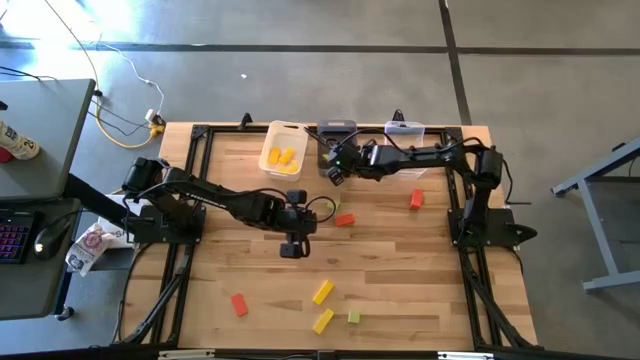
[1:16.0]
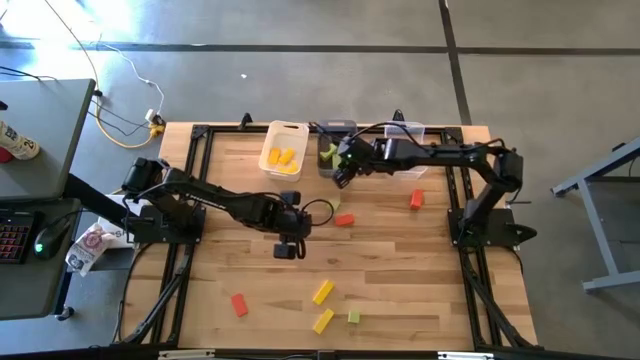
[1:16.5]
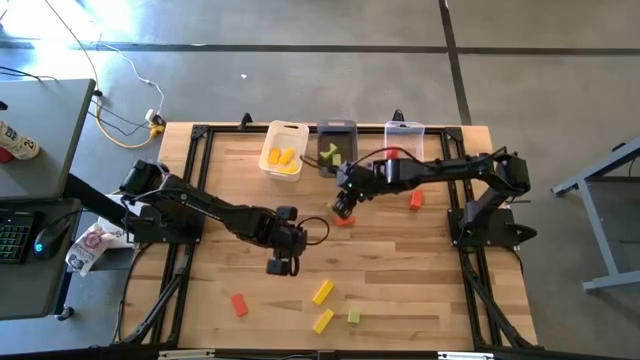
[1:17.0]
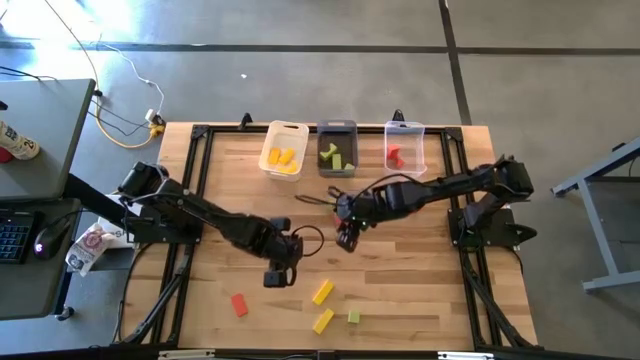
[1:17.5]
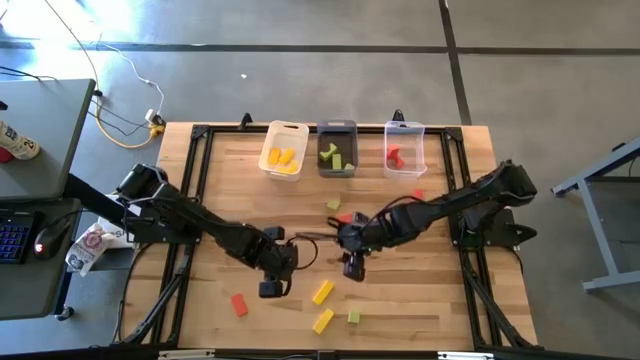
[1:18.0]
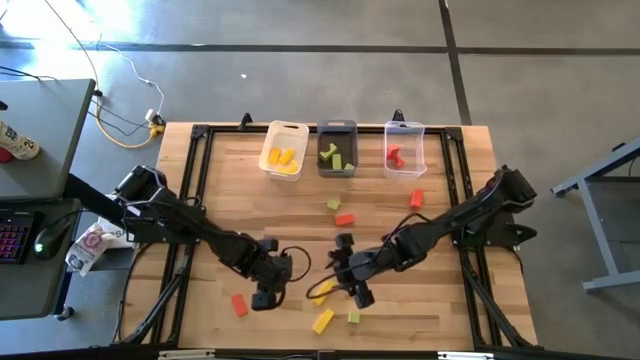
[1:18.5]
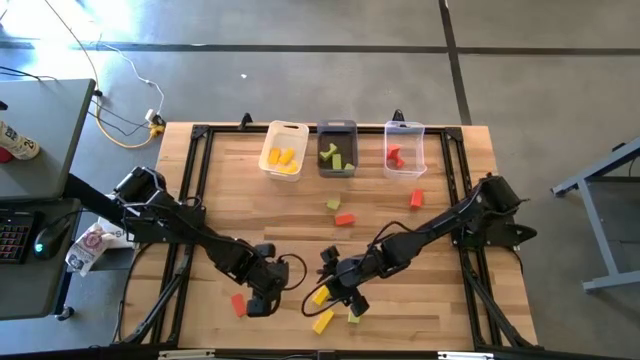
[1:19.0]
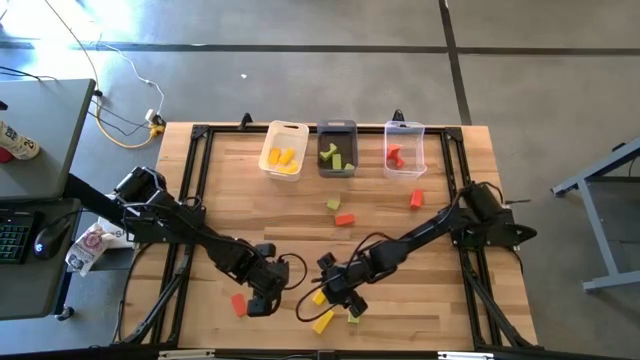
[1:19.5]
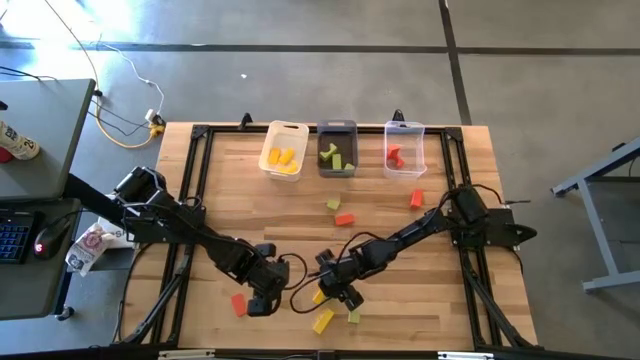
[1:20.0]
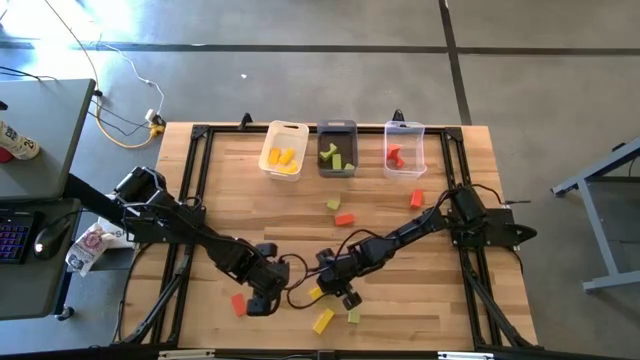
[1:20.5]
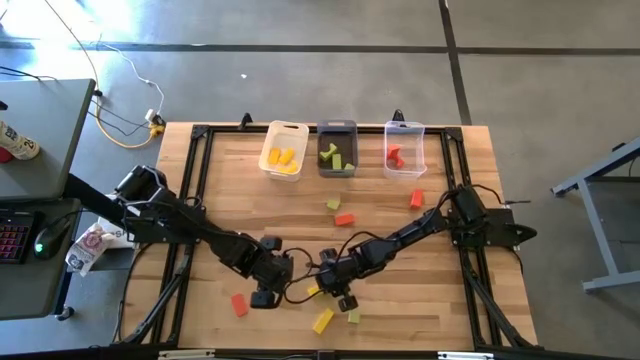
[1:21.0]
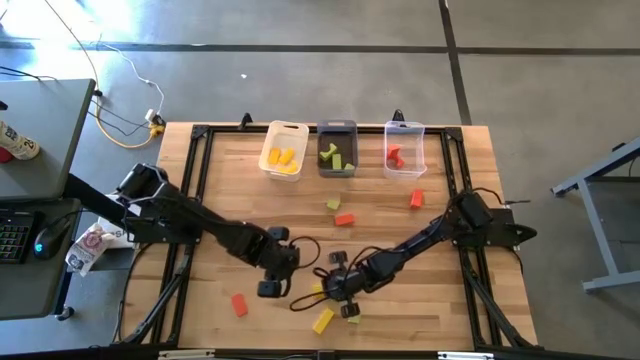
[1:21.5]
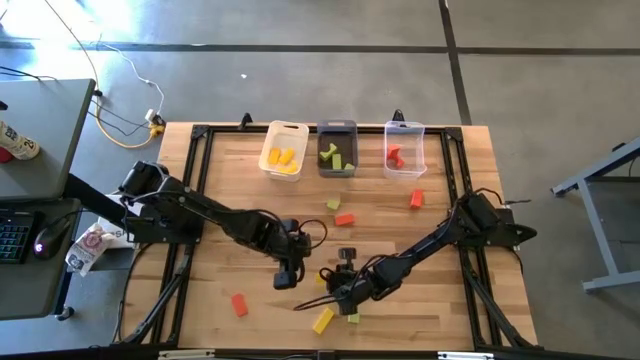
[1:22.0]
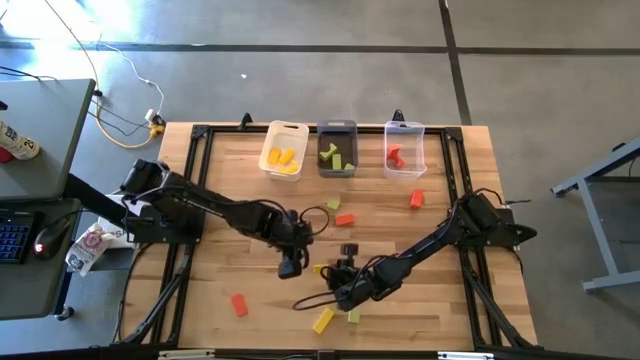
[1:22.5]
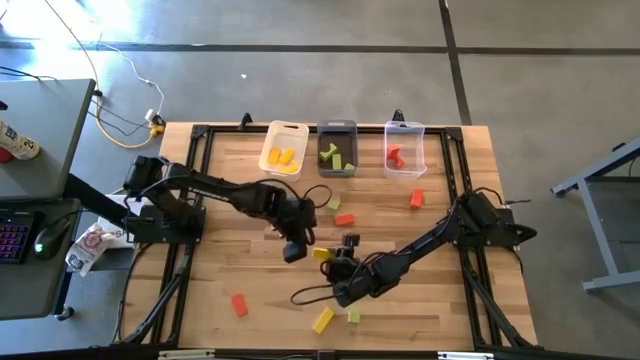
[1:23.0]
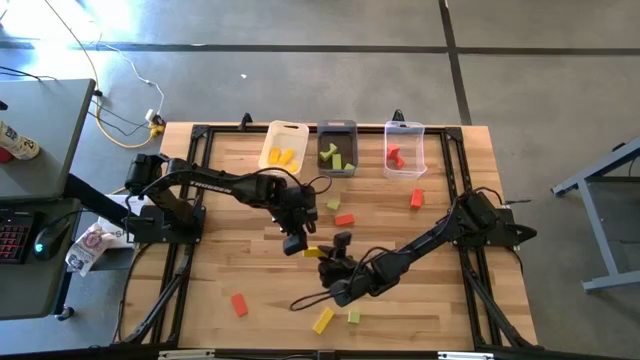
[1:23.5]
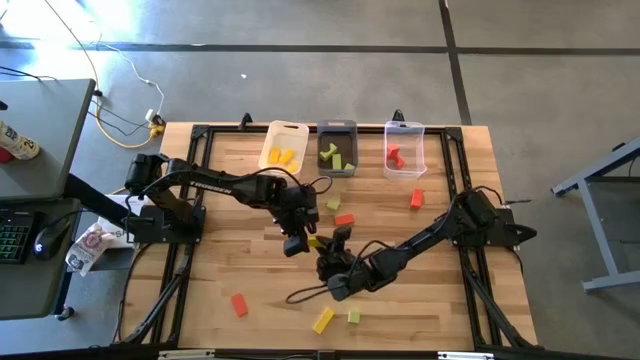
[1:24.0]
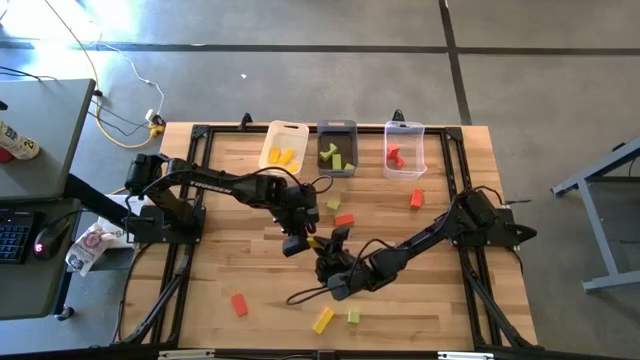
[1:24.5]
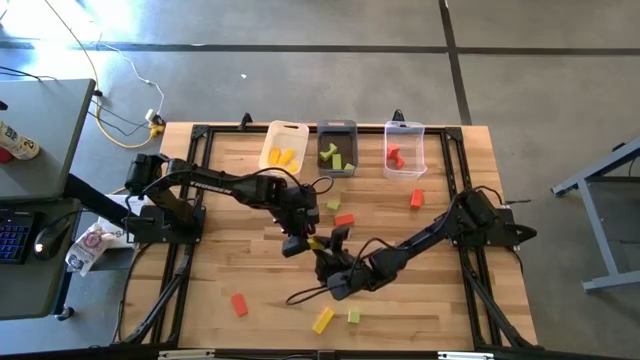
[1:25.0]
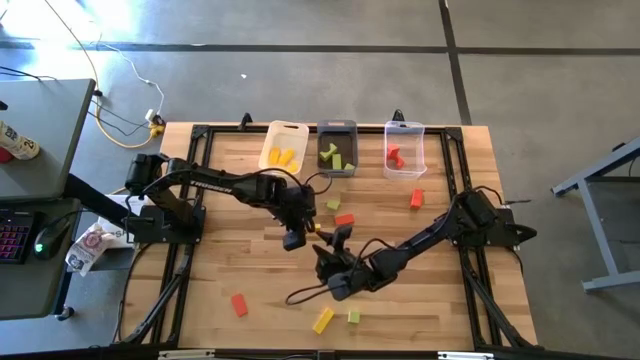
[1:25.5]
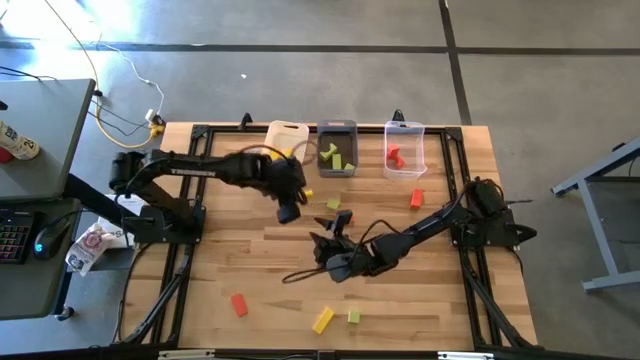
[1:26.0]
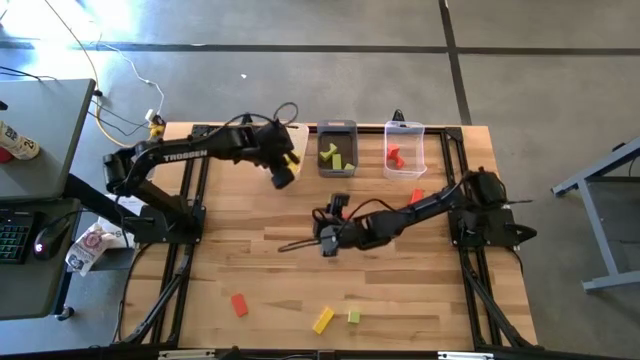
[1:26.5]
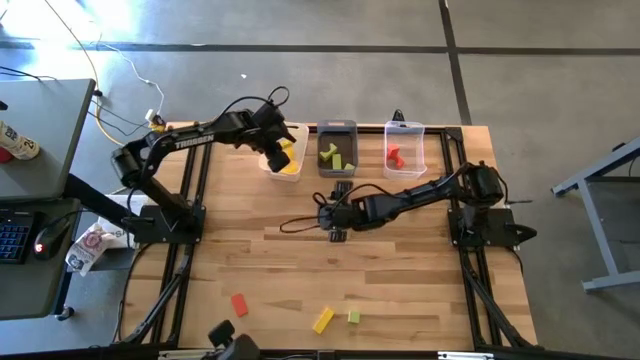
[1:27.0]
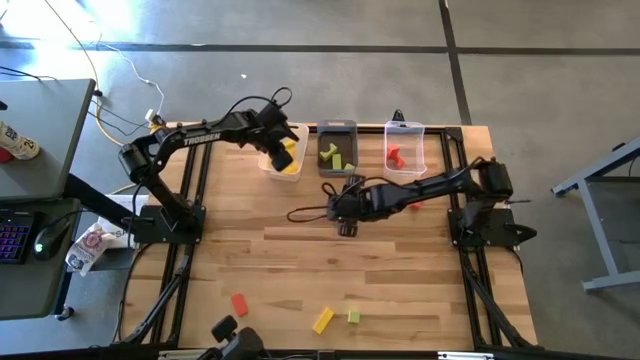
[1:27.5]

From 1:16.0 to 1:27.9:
Task: Sort & place blocks by color
Put the yellow block into the white bin

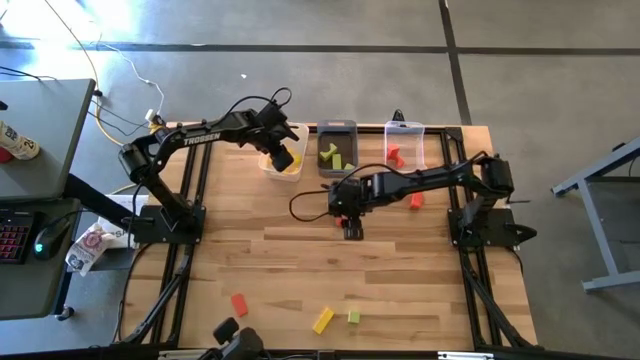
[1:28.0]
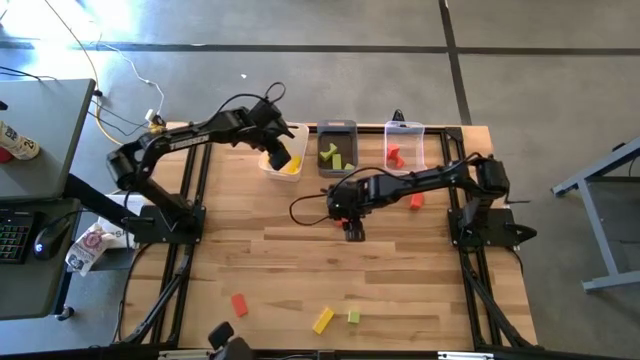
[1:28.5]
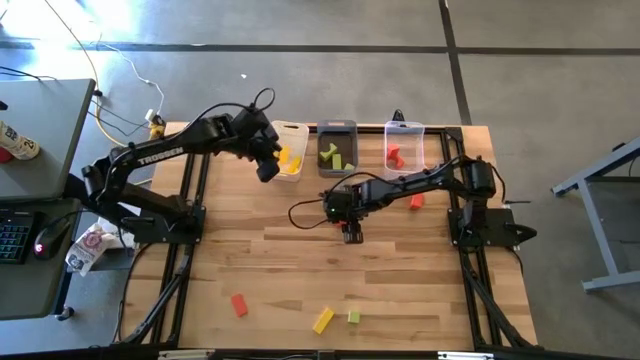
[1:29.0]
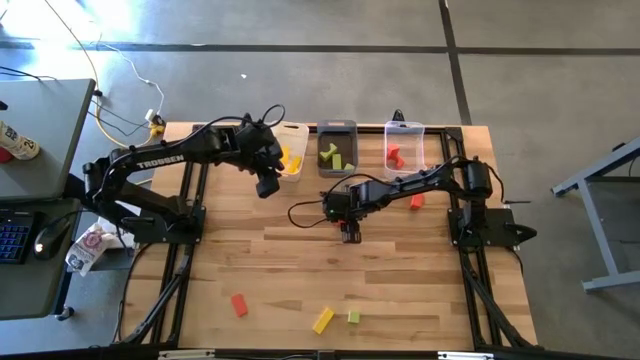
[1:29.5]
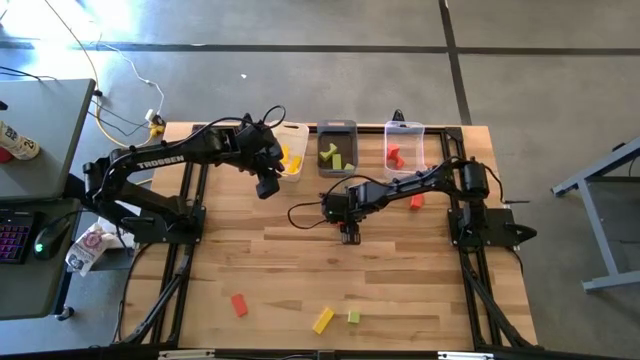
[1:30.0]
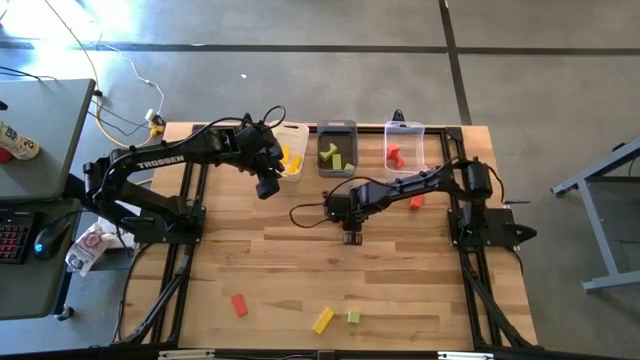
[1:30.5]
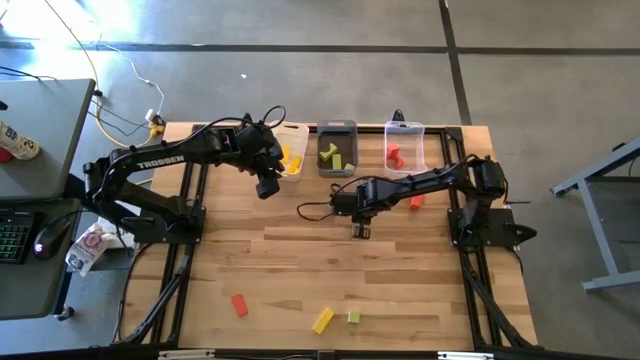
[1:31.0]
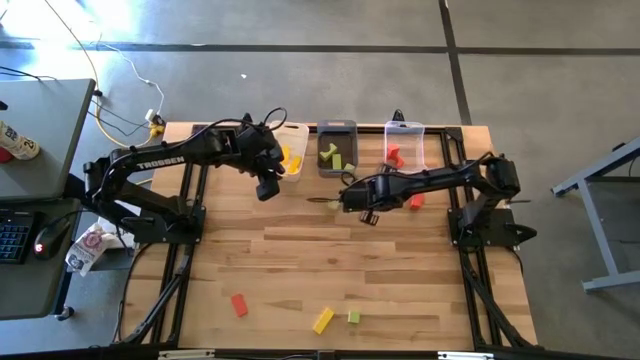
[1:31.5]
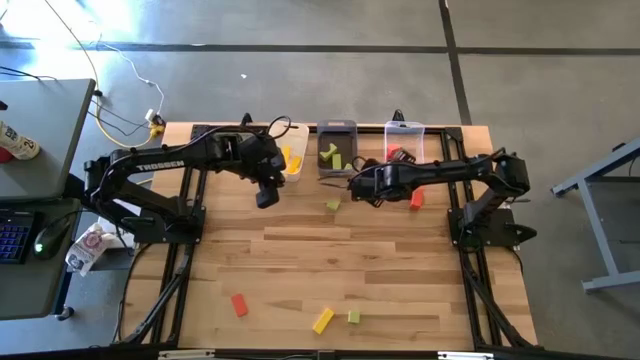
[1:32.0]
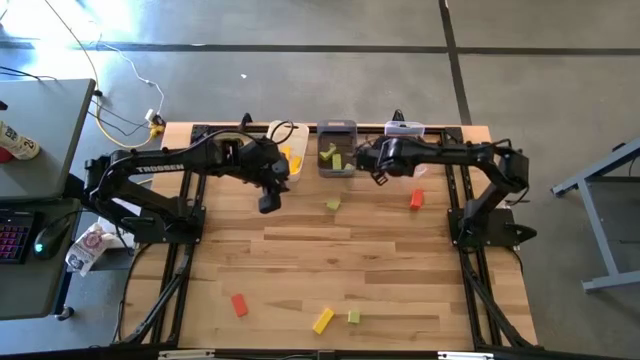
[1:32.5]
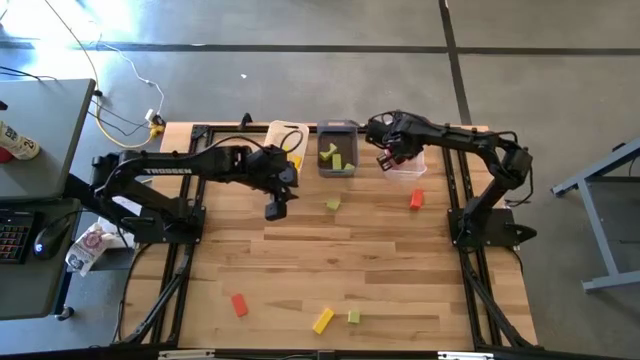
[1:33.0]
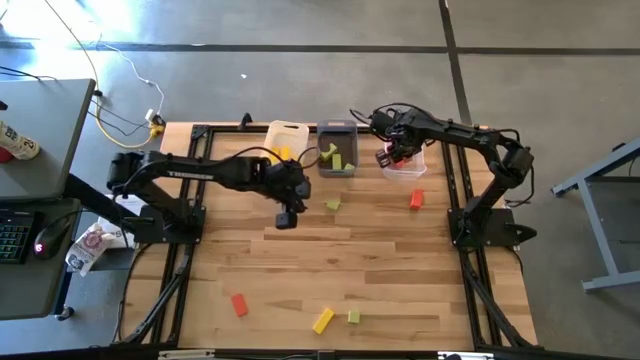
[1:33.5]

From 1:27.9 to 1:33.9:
Put the orange block into the transparent bin

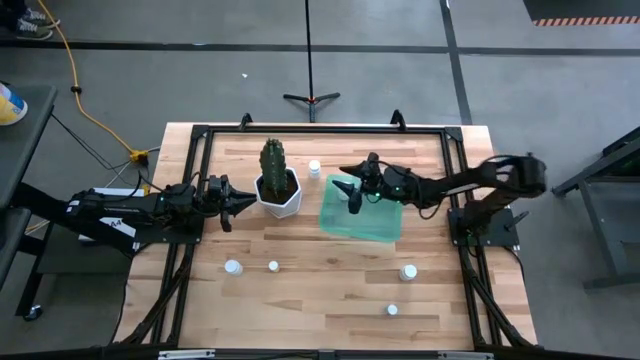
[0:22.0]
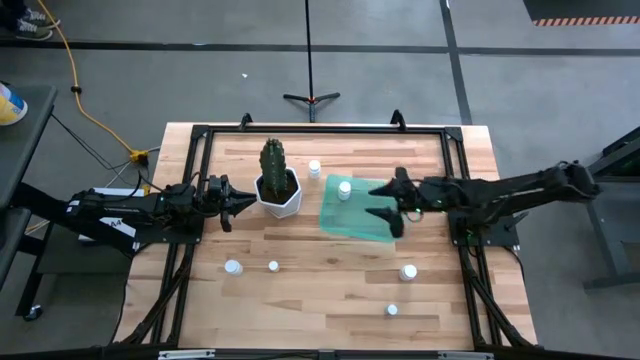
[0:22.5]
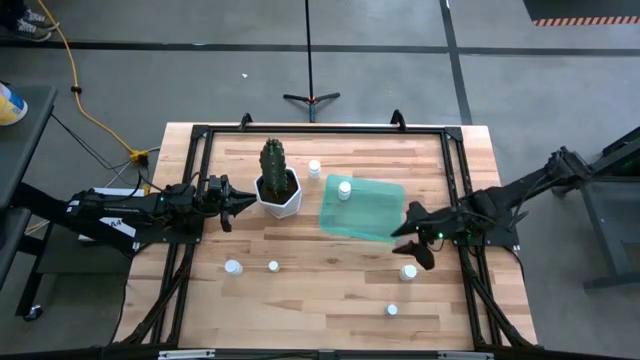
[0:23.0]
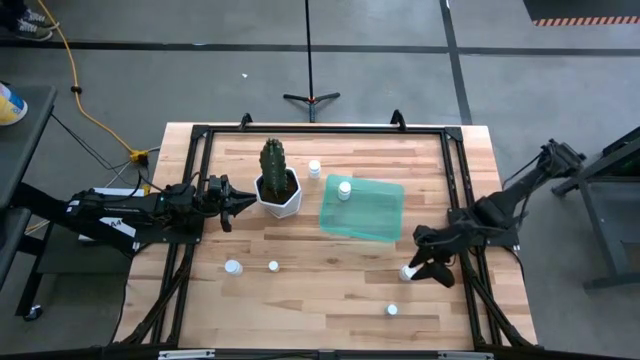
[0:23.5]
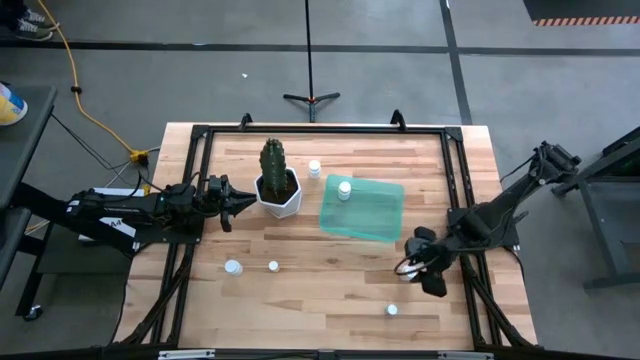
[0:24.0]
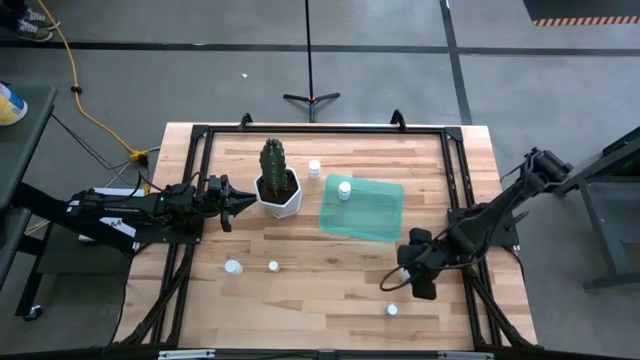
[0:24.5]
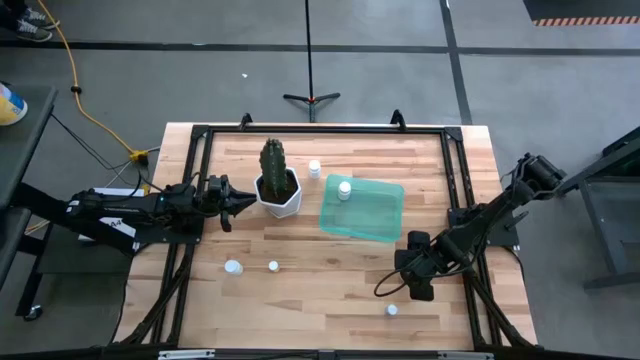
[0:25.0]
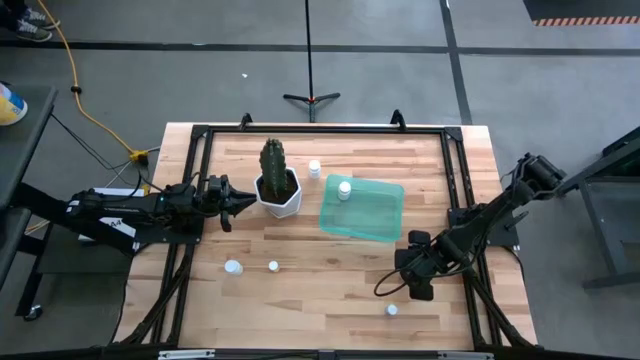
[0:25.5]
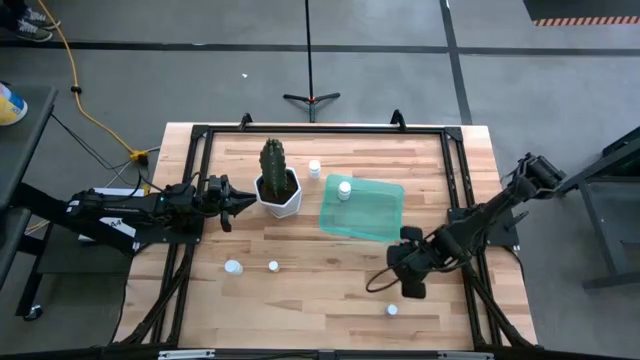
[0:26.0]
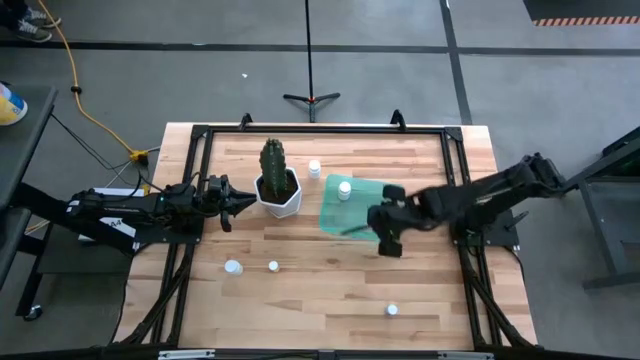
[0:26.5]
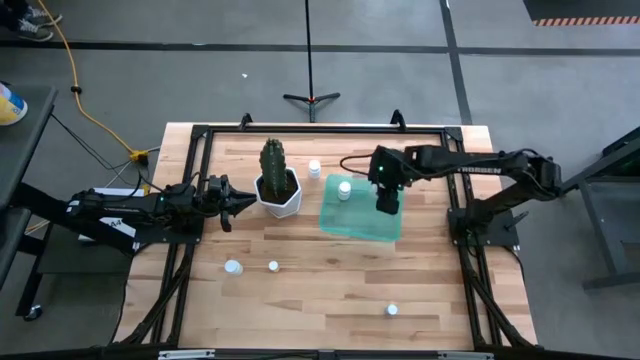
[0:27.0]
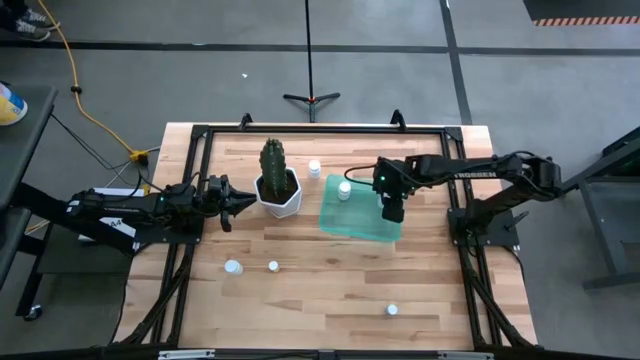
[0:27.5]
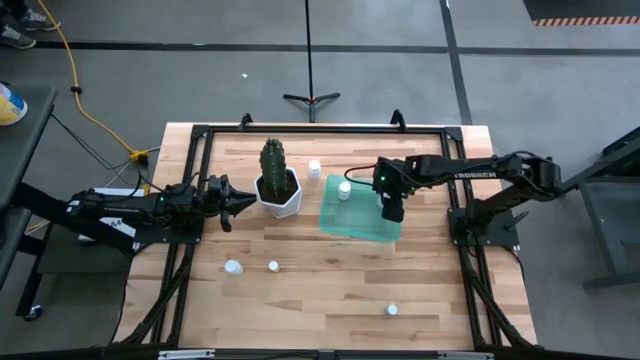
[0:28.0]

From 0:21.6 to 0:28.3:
Task: Pick and place pill bottles into a basket
Put the white pill bottle into the light green bin
